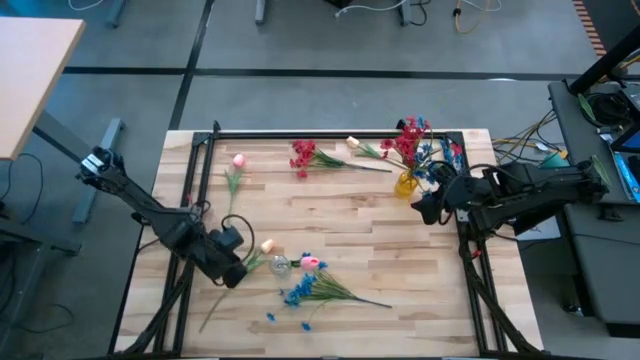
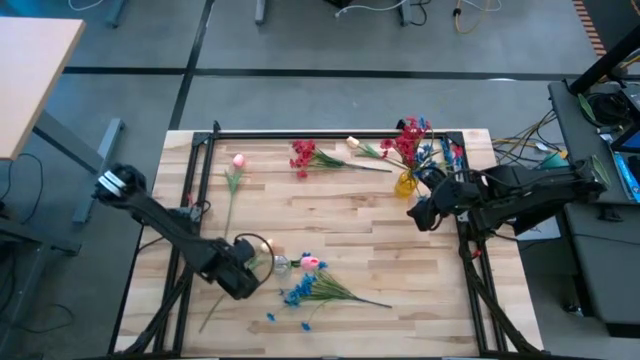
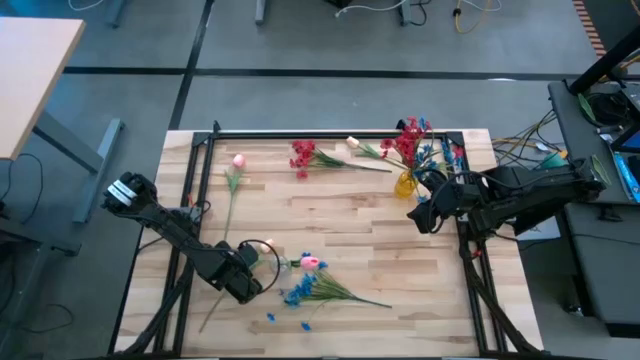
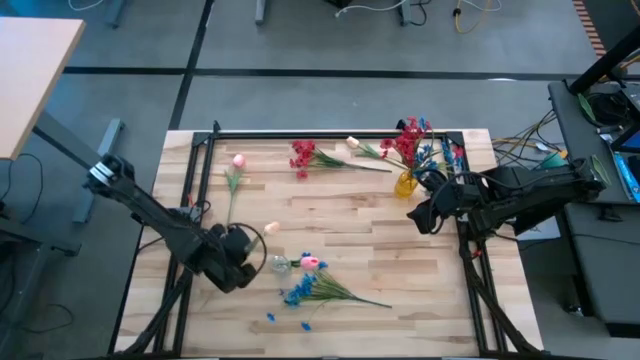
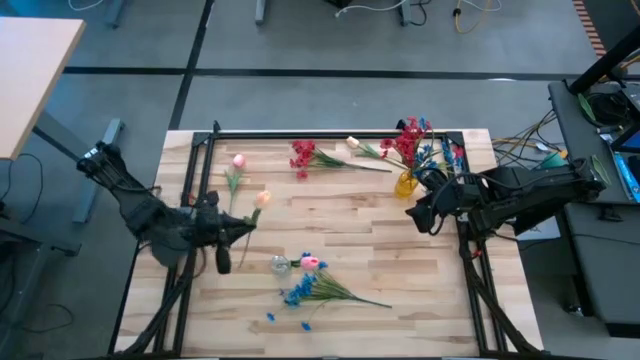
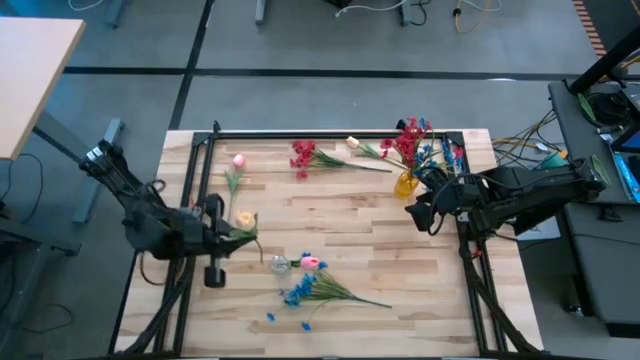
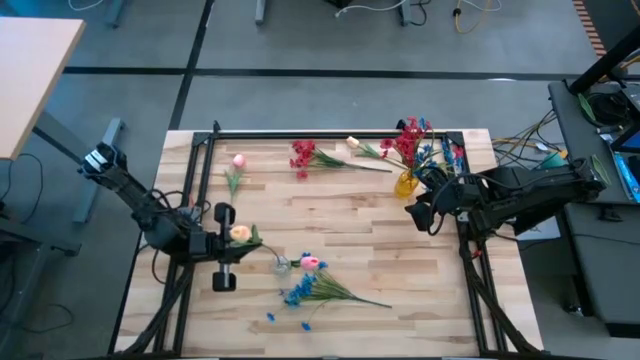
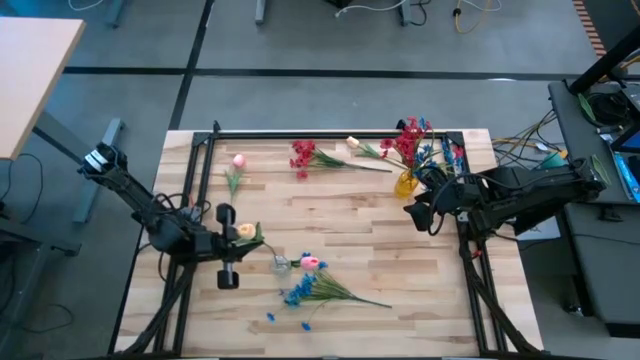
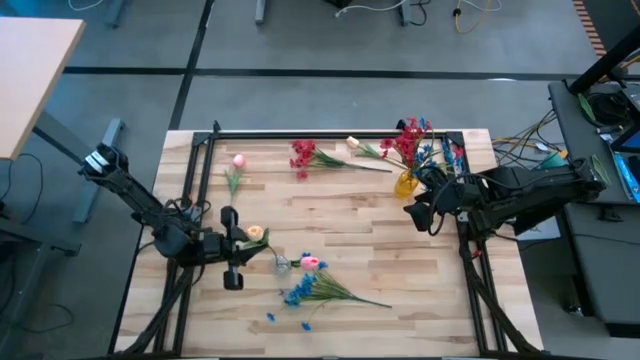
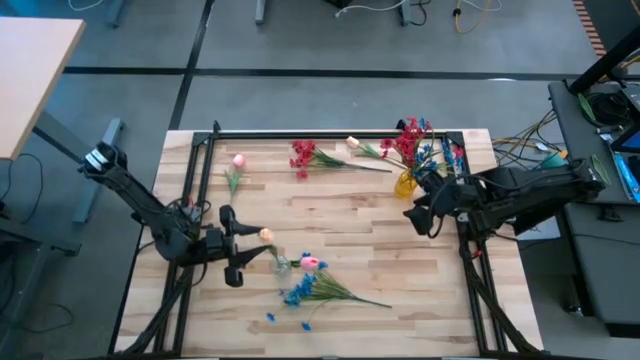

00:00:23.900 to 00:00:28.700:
Task: Sort flowers into vase by color
Put the bottom yellow tulip into the transparent vase

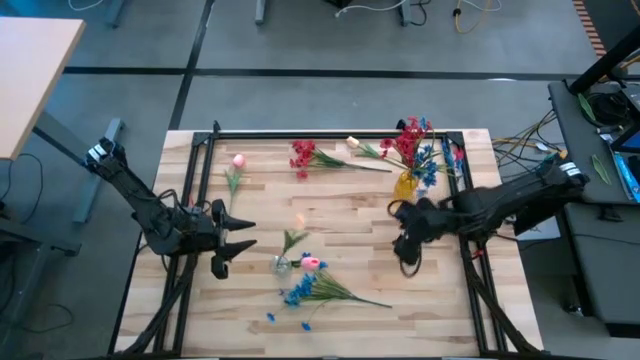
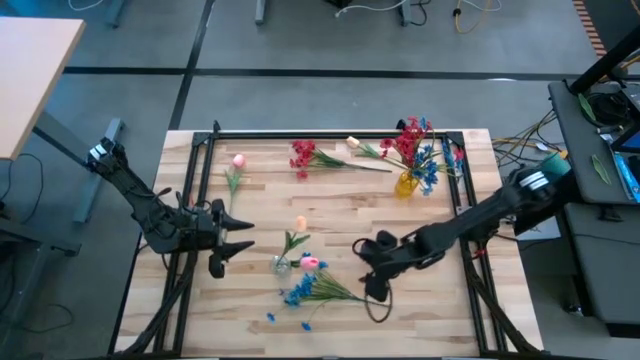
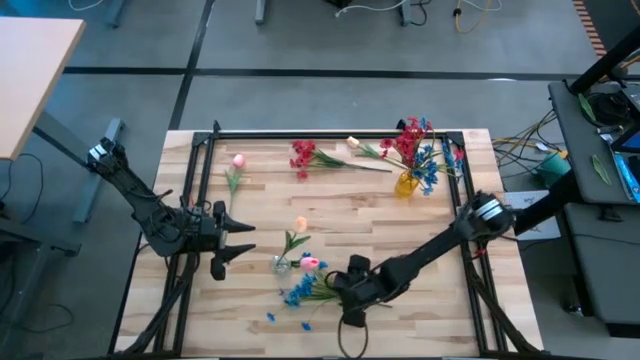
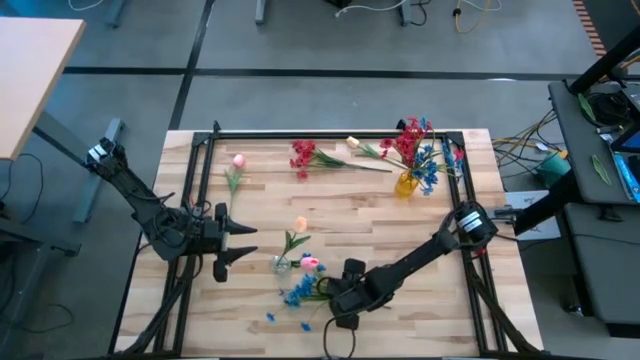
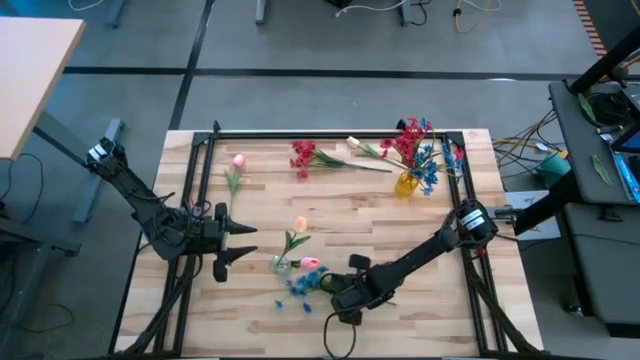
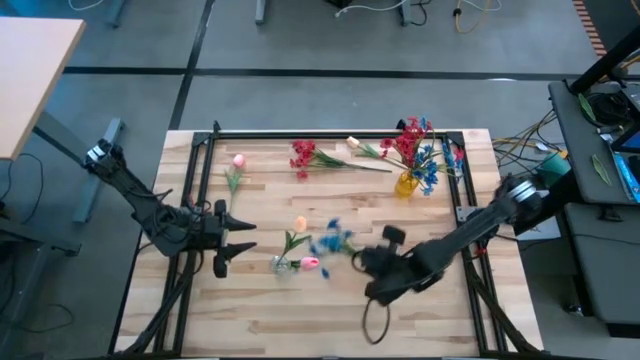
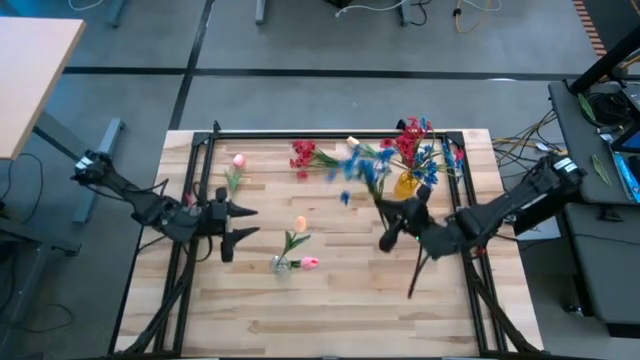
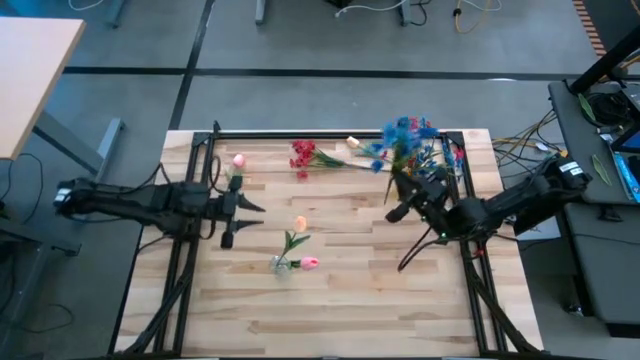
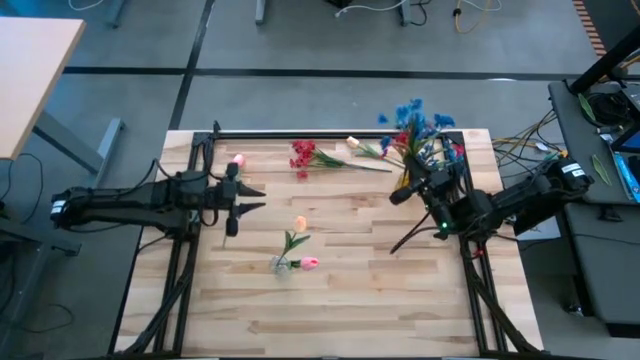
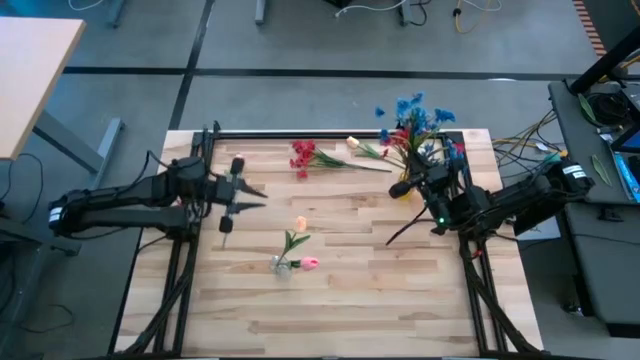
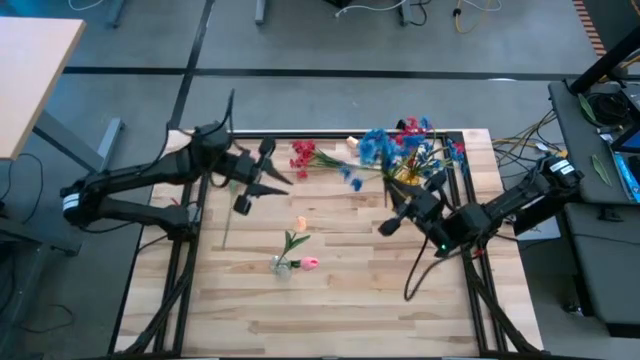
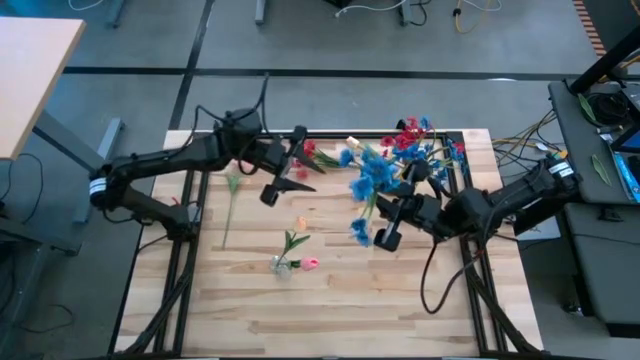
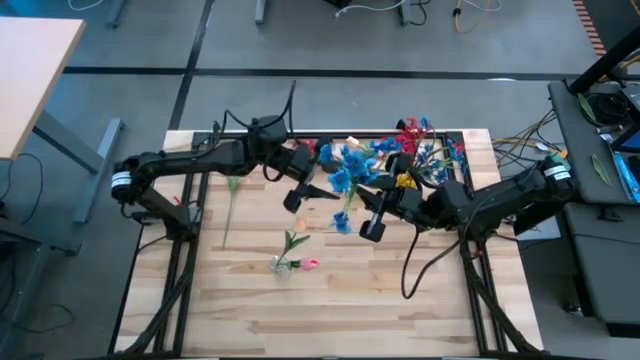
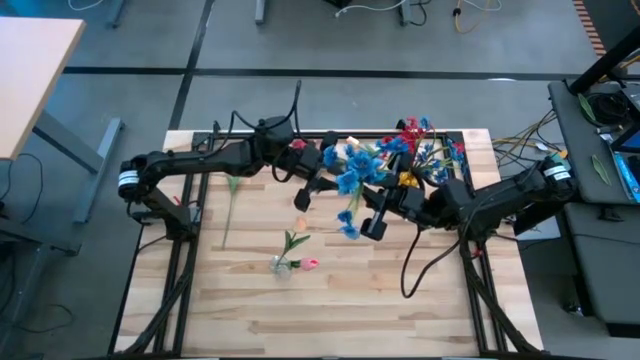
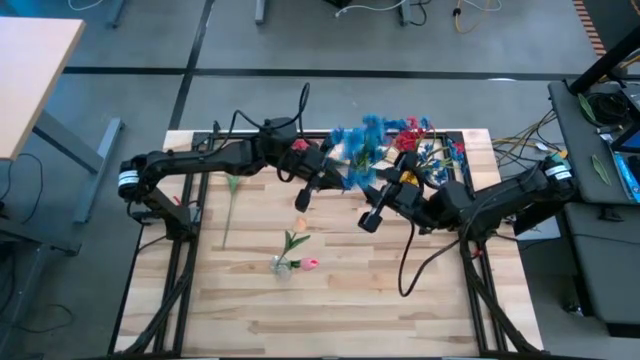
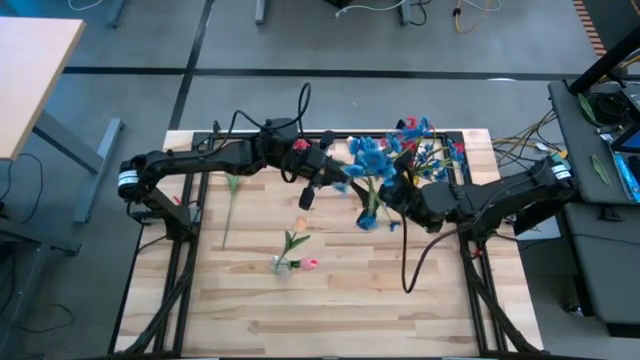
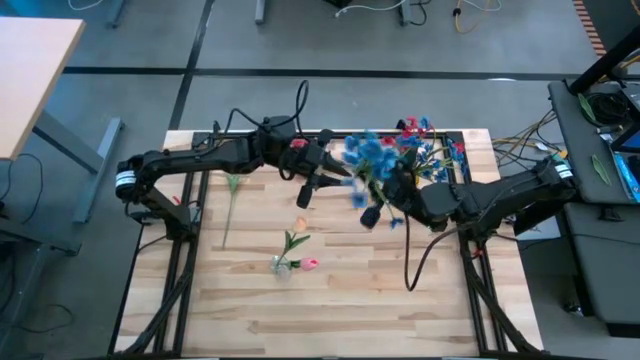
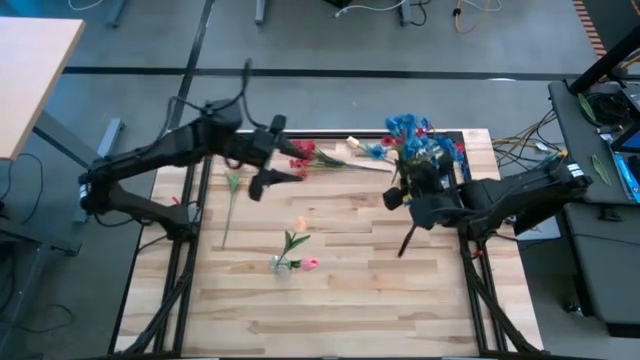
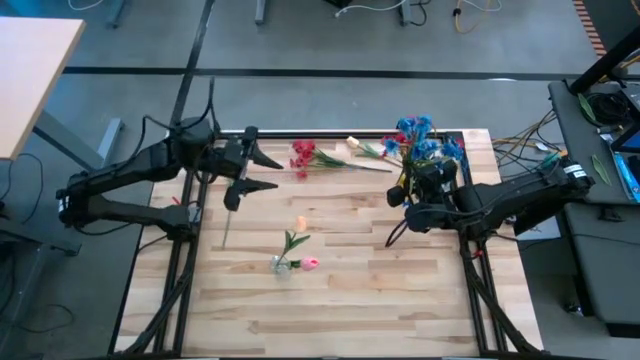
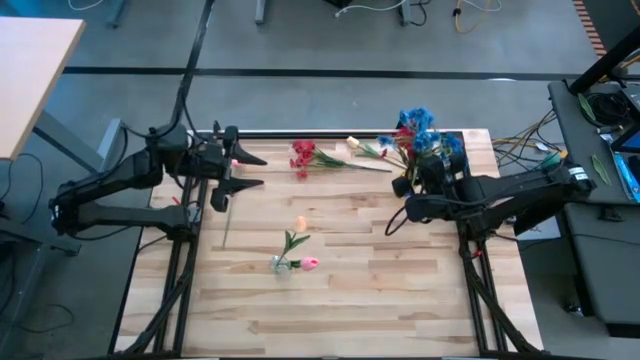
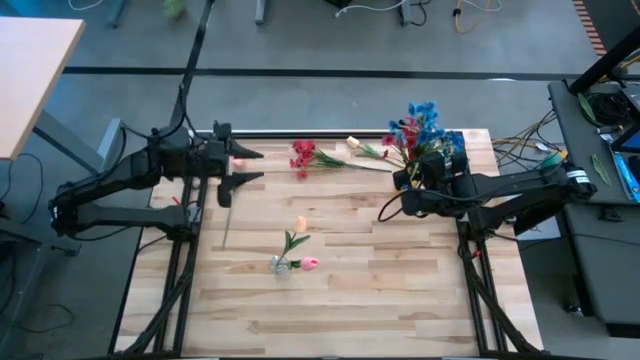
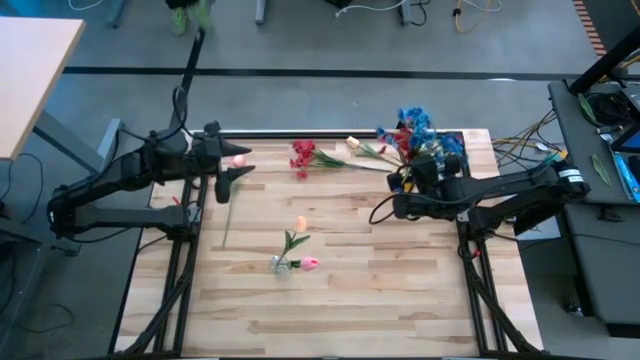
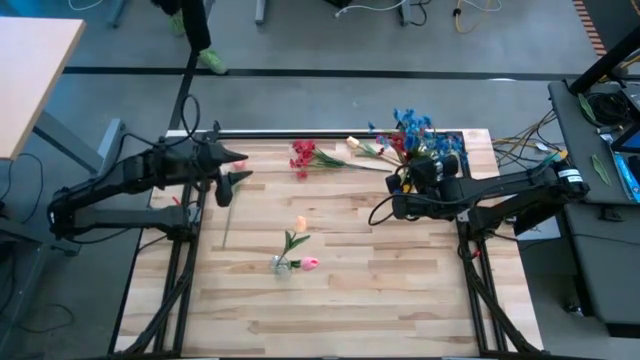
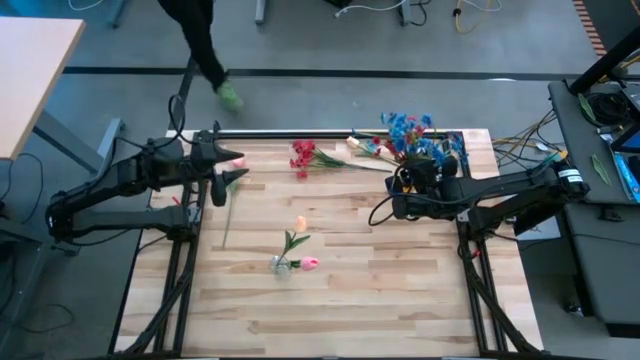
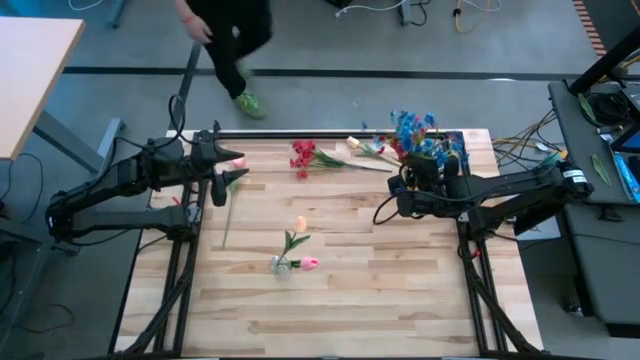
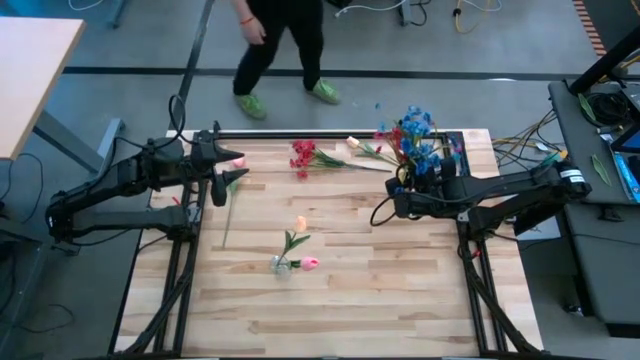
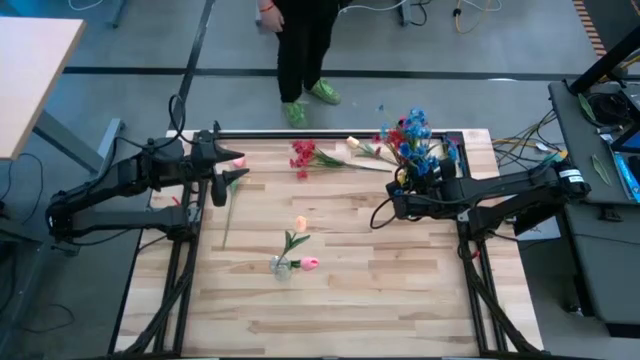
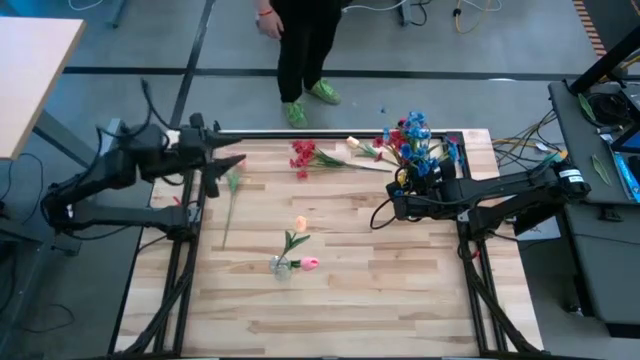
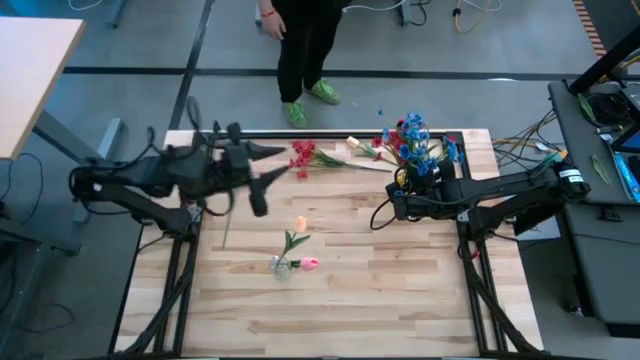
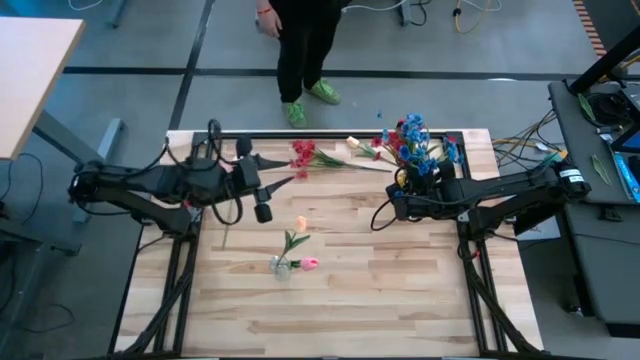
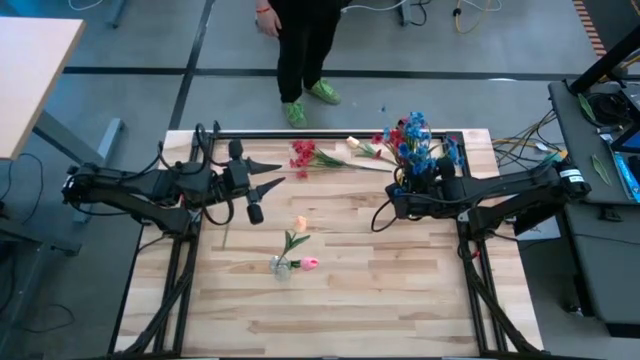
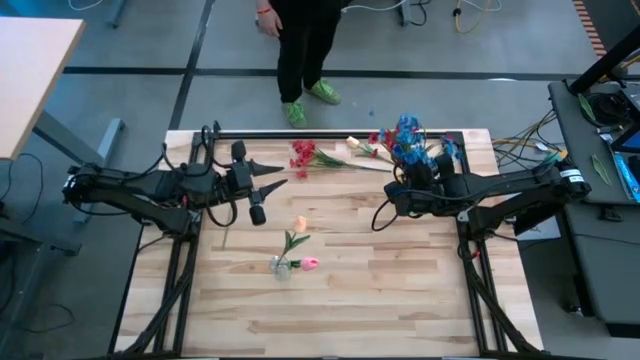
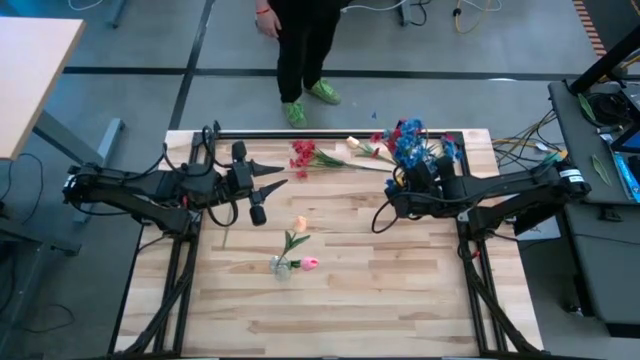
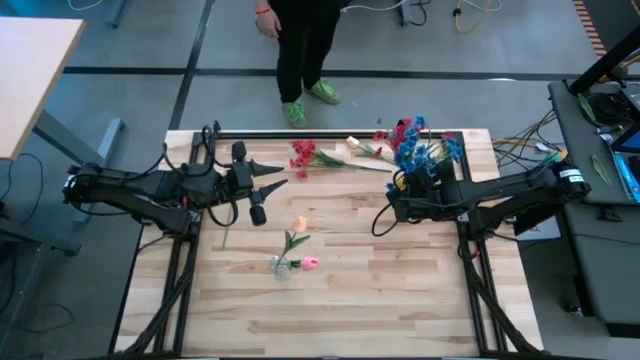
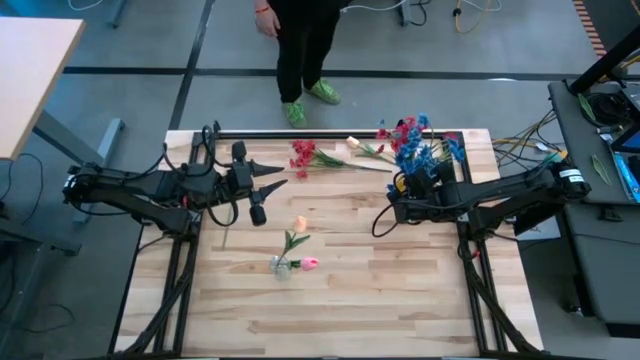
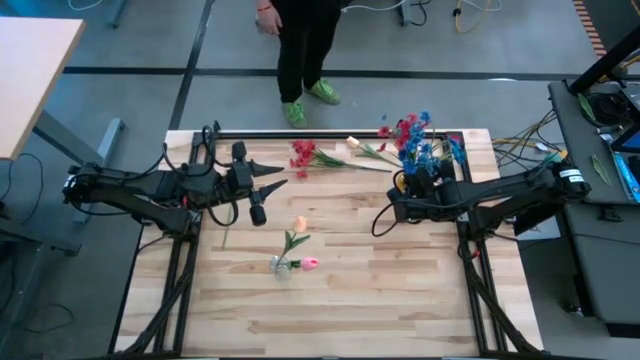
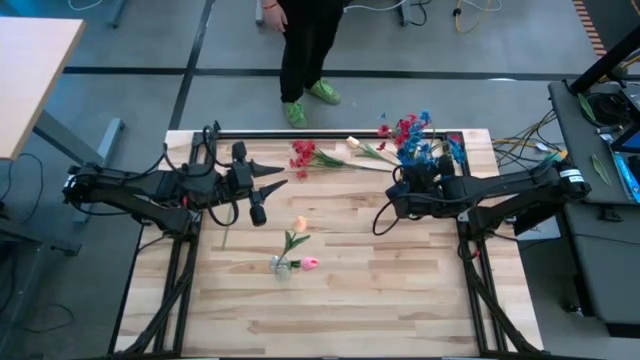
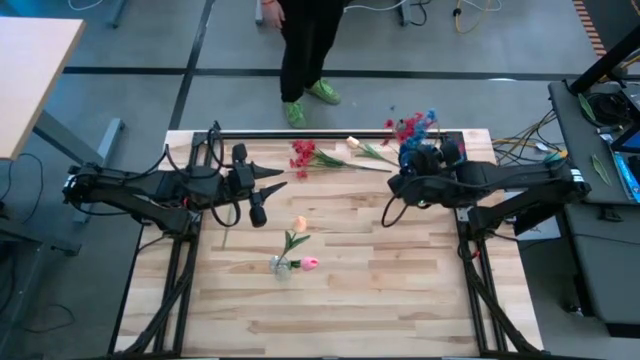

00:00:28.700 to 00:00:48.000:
Put the blue flowers into the yellow vase
